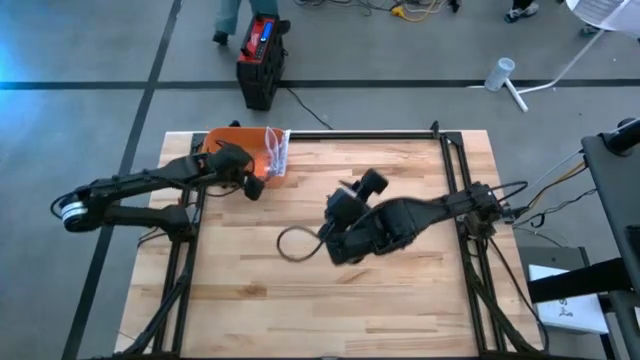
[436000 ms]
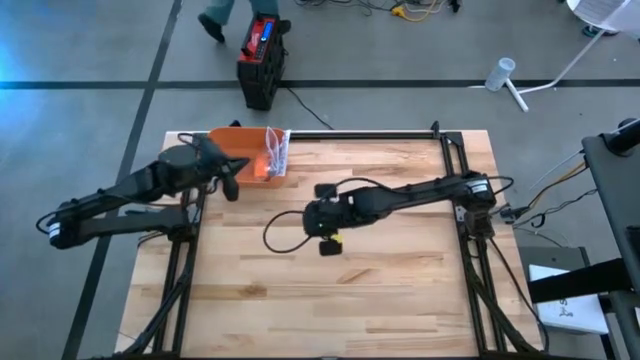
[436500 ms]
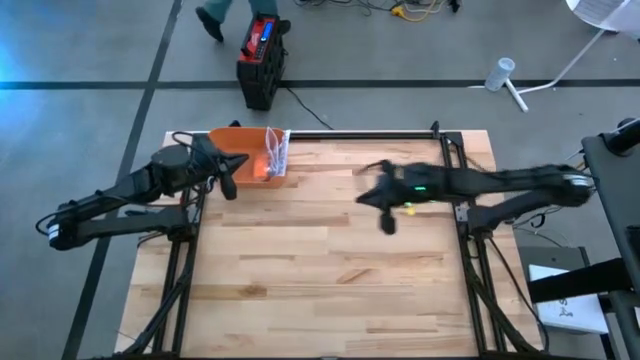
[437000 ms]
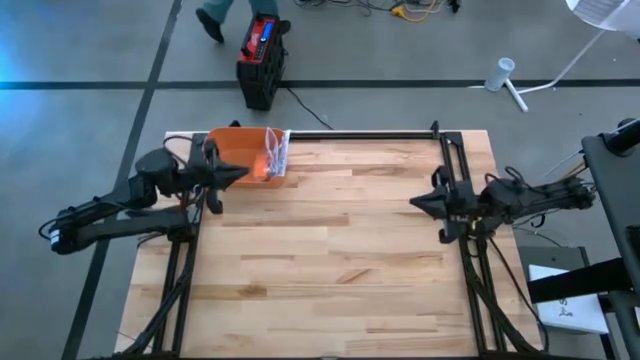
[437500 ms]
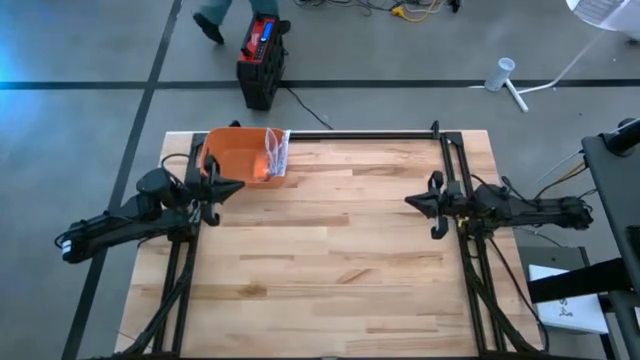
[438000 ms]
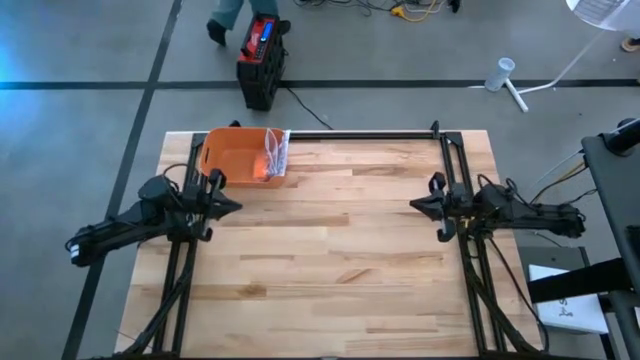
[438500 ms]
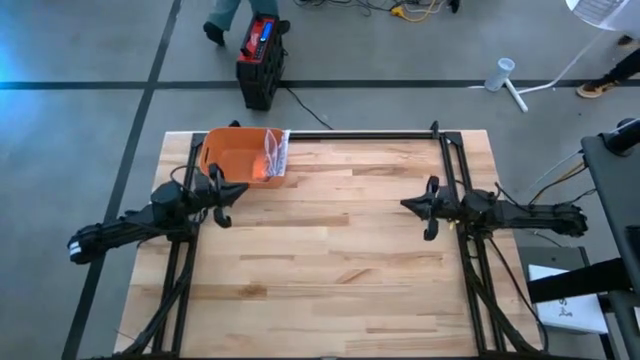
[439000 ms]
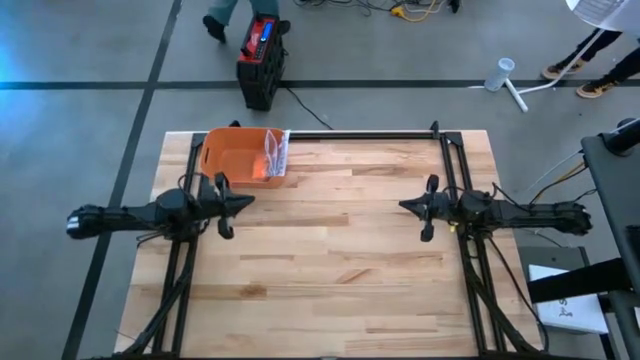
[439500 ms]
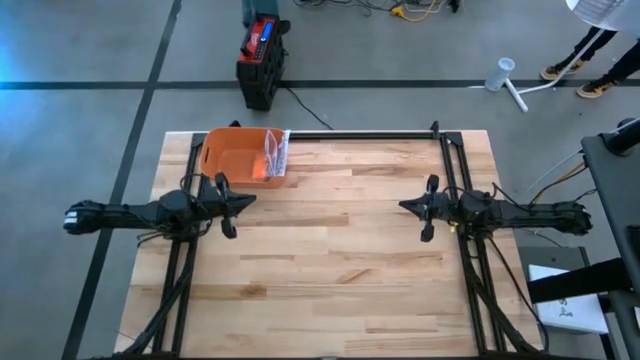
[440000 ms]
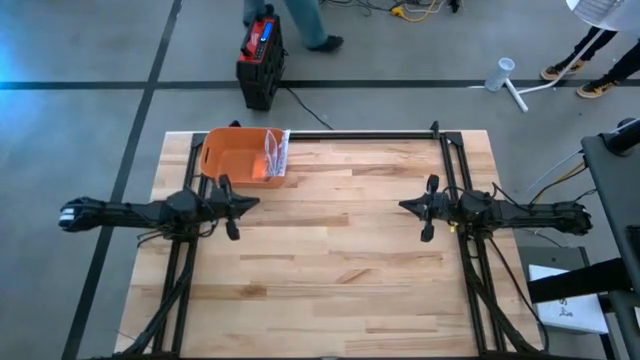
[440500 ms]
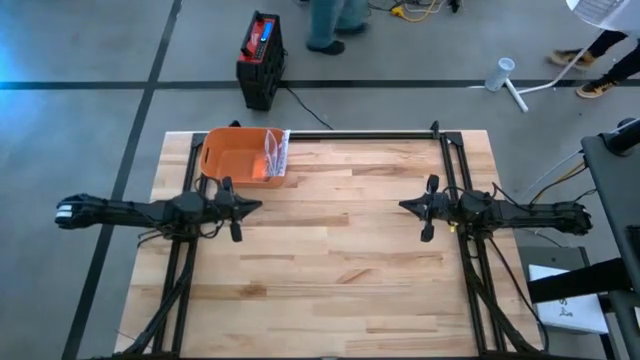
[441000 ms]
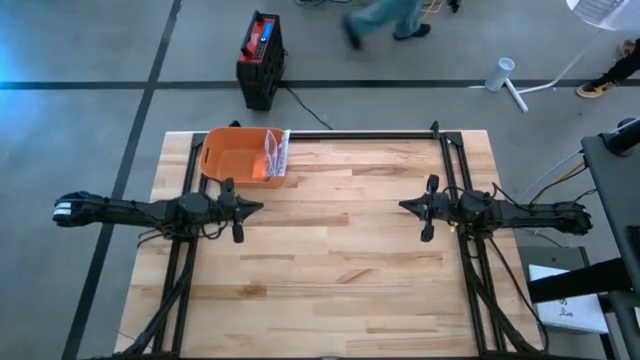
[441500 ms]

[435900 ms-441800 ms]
Task: Roll bandage
Return to Home Position

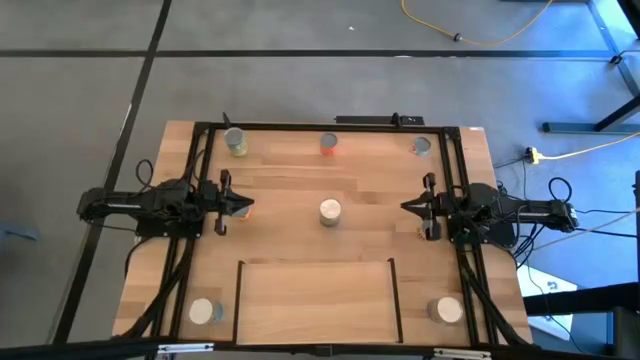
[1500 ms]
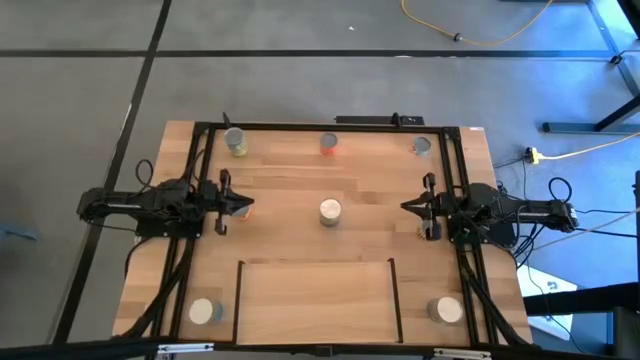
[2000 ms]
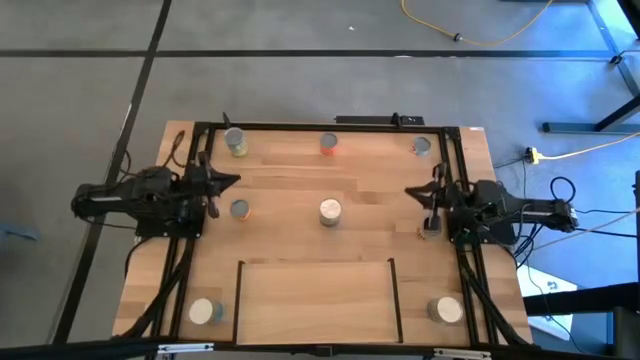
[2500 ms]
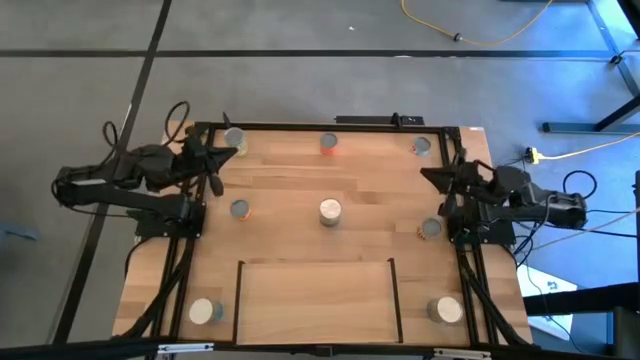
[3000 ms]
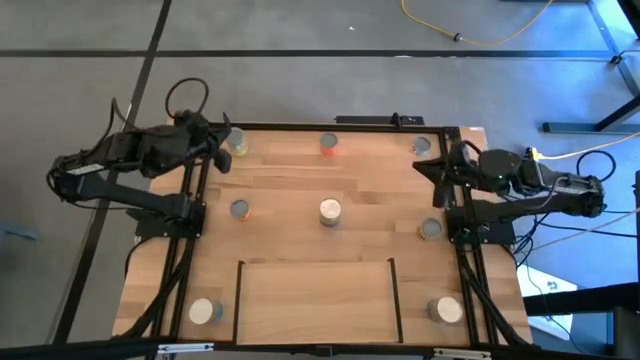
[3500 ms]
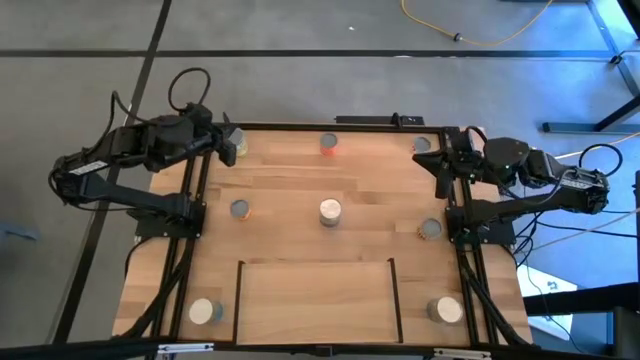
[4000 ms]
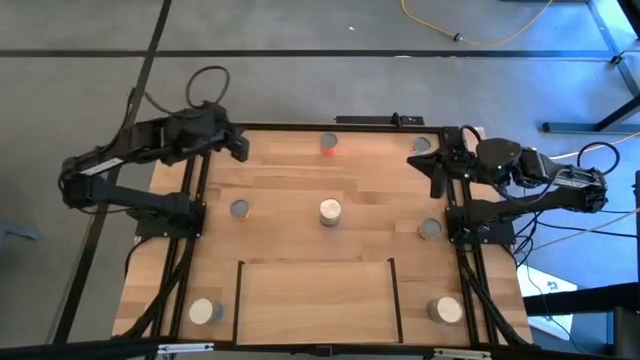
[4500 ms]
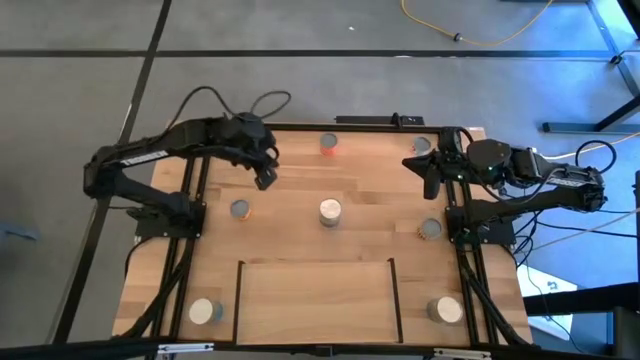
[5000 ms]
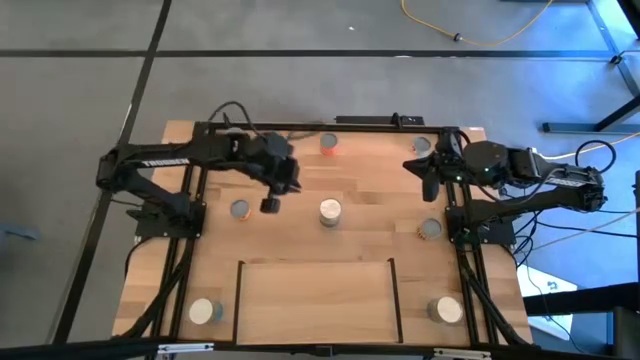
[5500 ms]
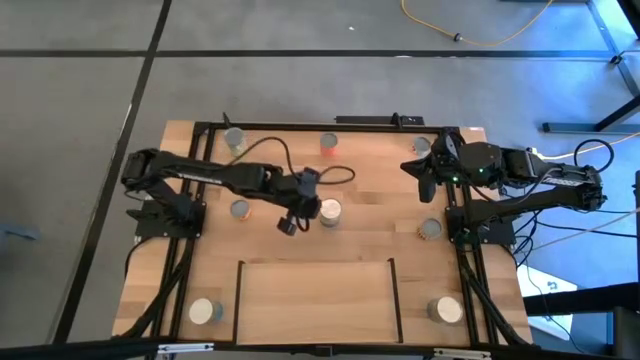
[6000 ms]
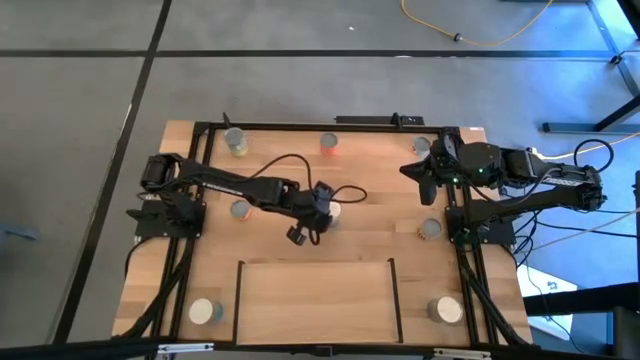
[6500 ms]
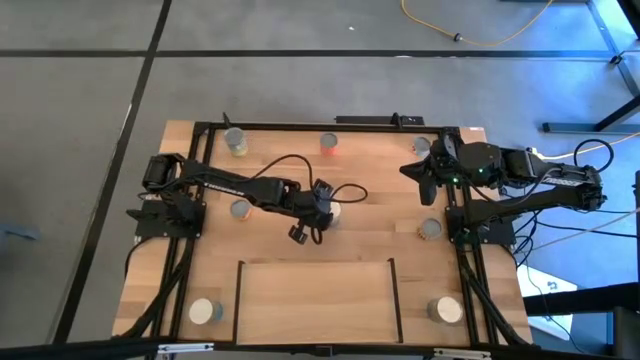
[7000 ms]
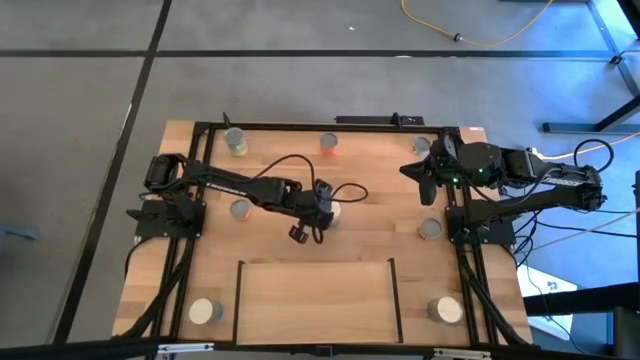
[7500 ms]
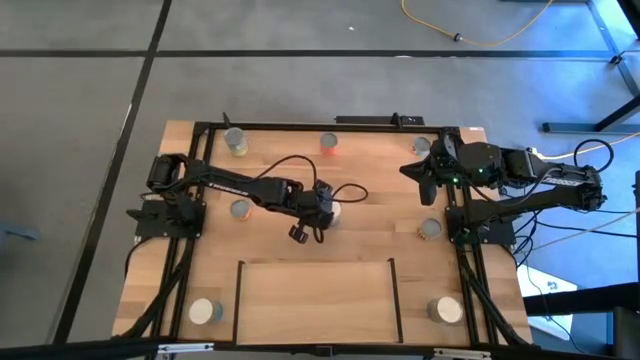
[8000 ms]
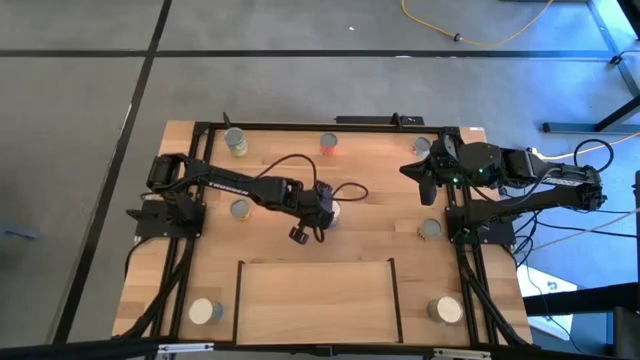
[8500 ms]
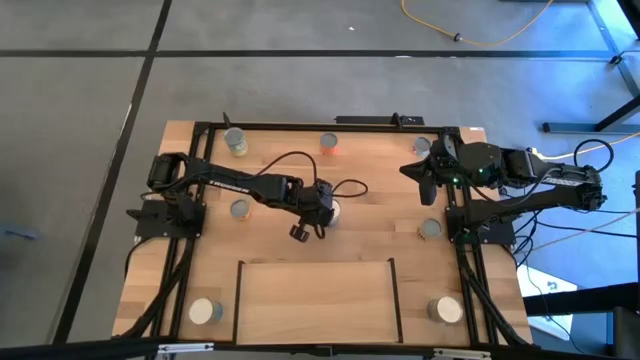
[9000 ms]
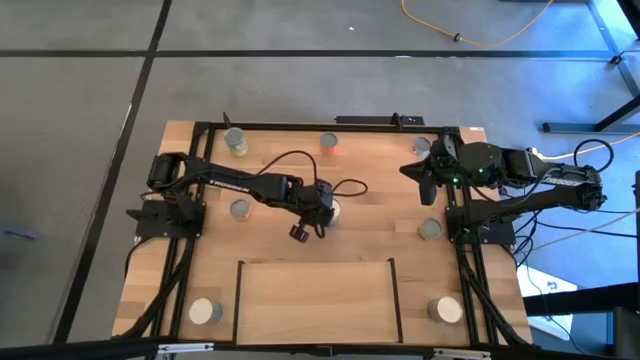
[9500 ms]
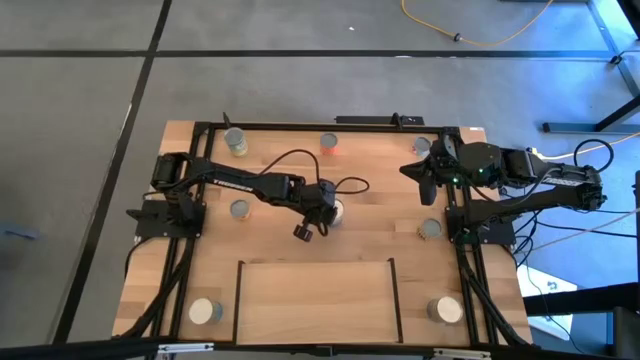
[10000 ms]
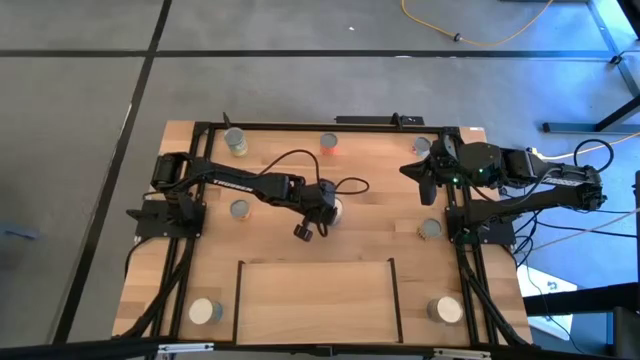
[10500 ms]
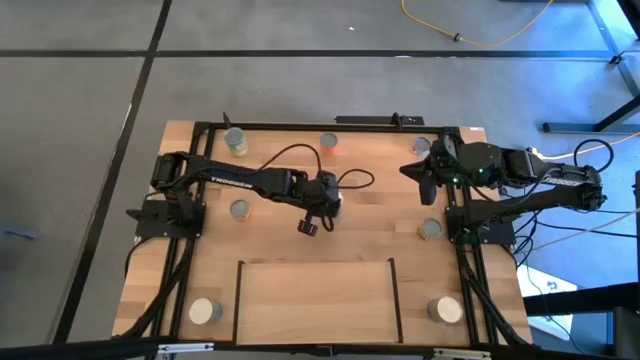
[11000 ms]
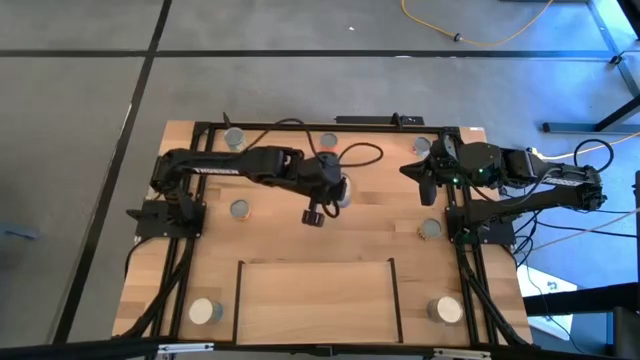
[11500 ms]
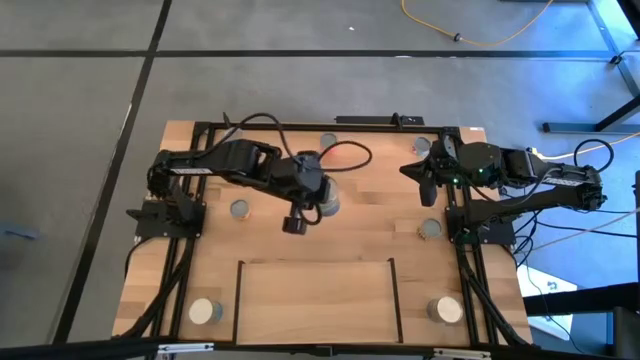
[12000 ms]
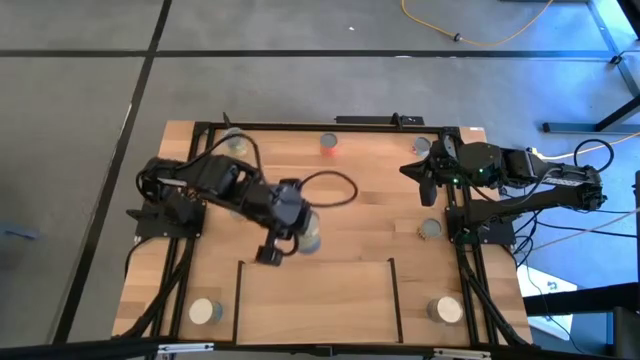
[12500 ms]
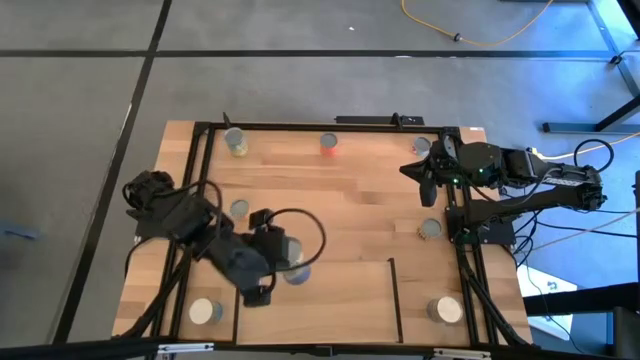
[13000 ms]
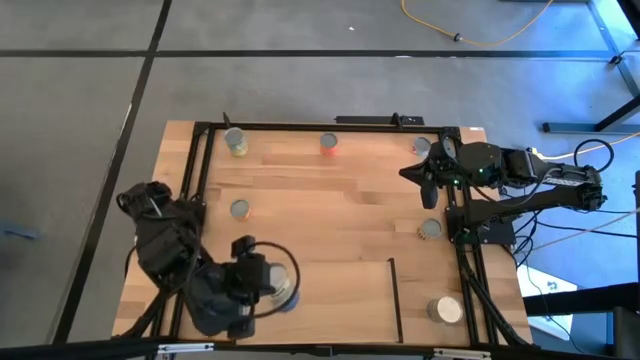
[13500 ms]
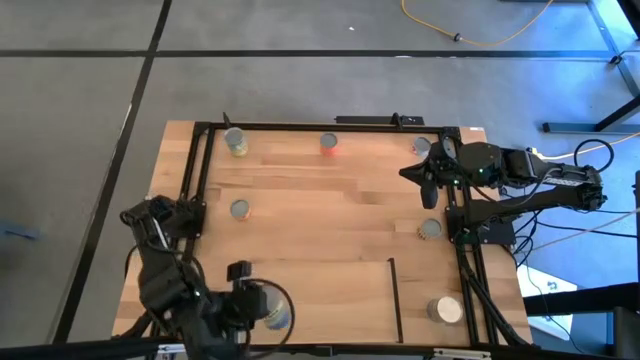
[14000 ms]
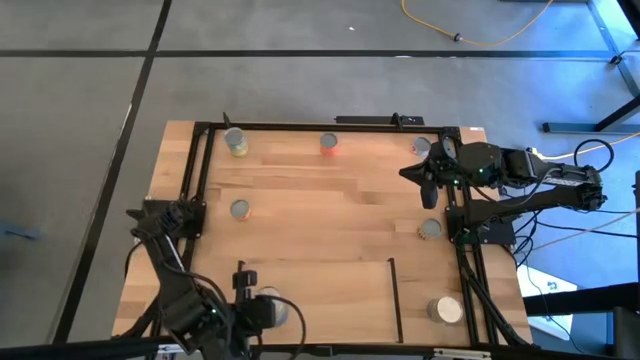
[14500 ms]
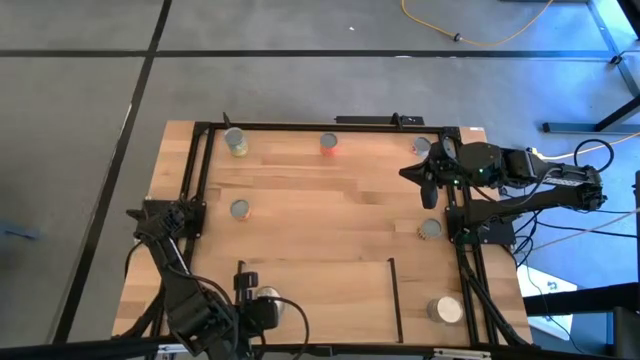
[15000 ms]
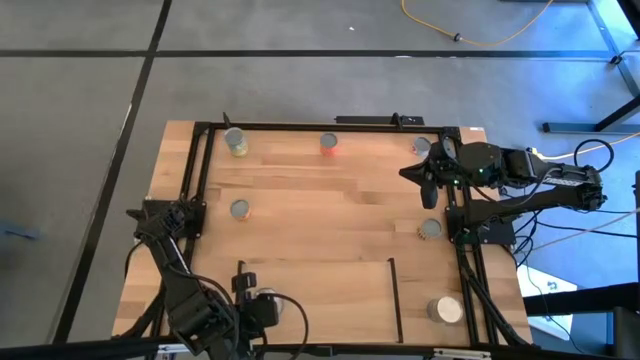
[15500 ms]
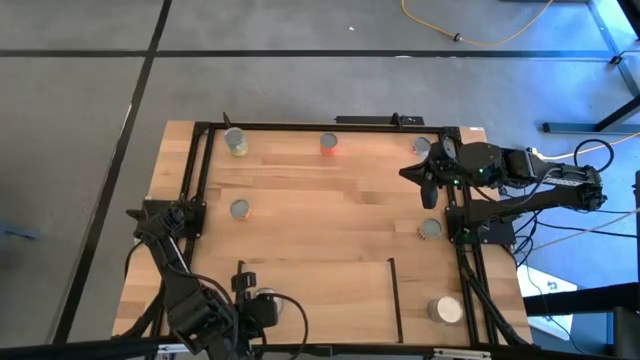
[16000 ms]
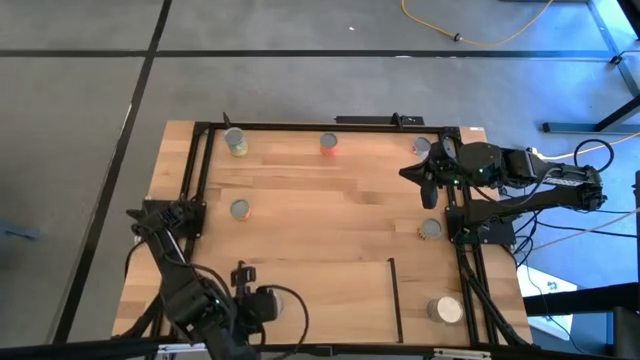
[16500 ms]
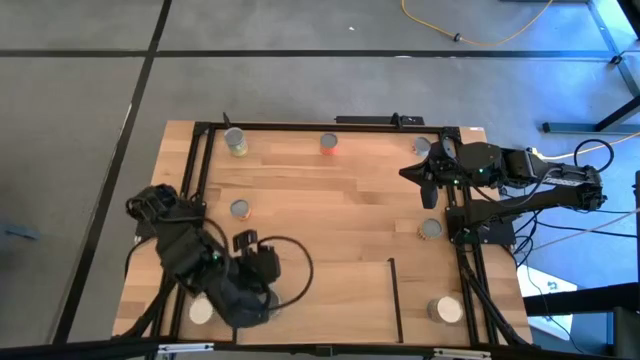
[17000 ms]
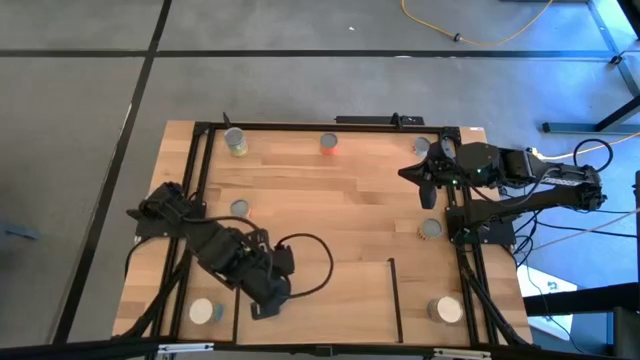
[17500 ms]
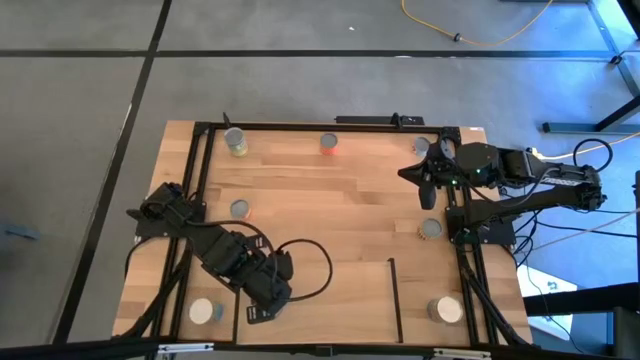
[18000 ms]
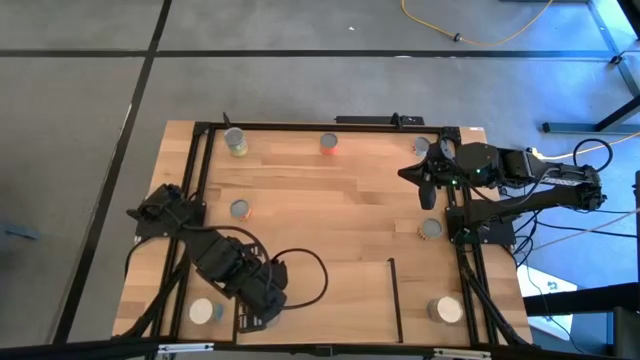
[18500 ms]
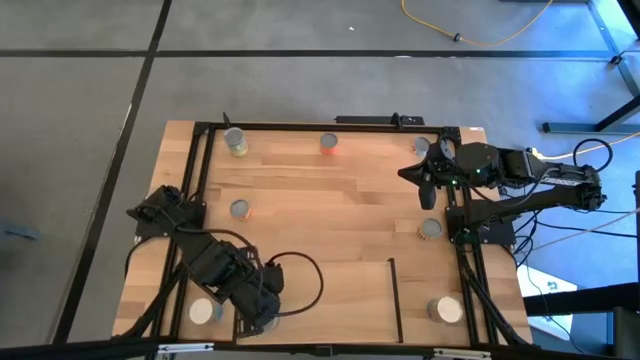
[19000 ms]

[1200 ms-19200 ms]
Task: Pick and place cans onto a shelf
Put the canned peas on the shelf
